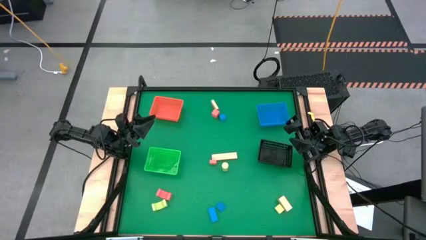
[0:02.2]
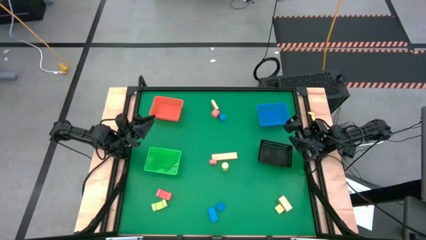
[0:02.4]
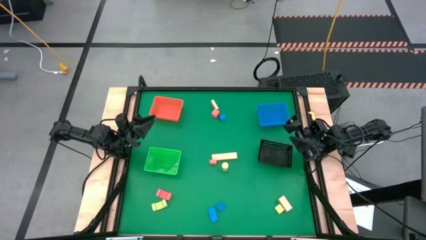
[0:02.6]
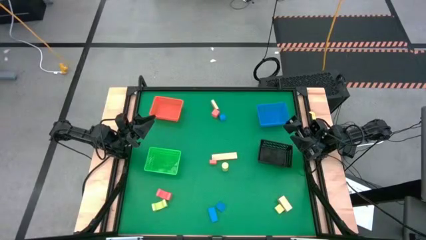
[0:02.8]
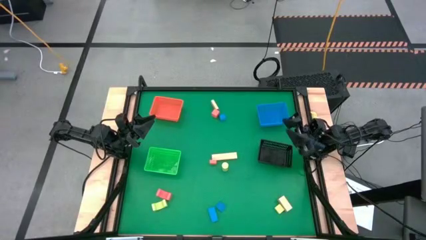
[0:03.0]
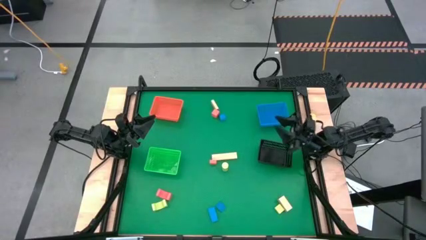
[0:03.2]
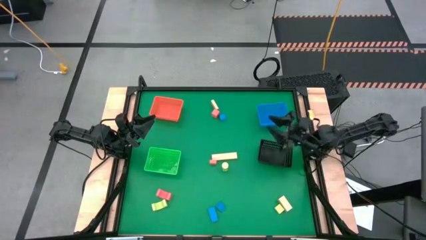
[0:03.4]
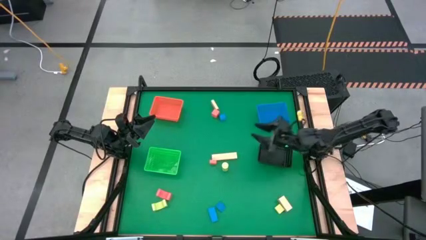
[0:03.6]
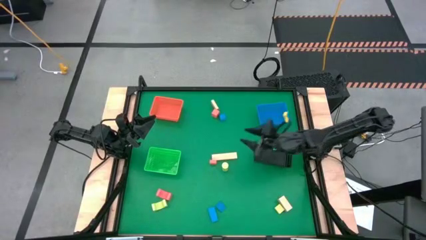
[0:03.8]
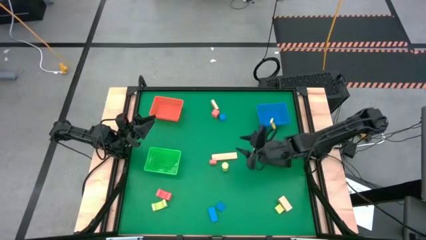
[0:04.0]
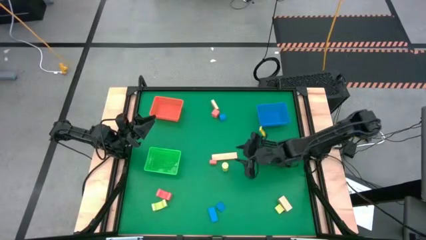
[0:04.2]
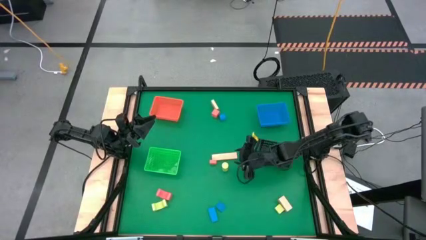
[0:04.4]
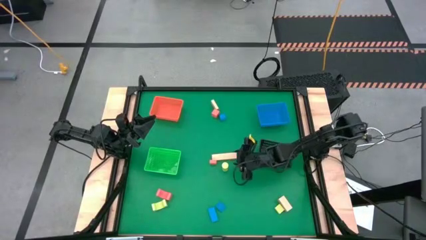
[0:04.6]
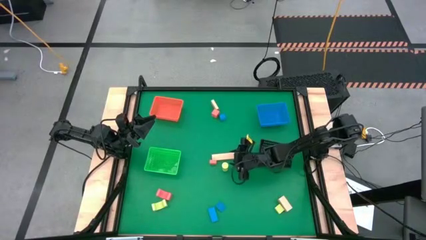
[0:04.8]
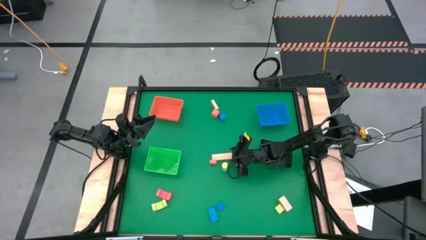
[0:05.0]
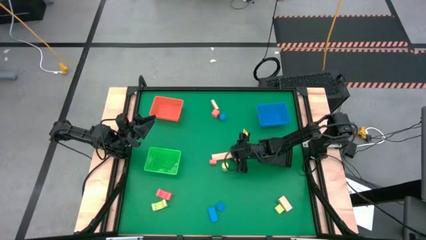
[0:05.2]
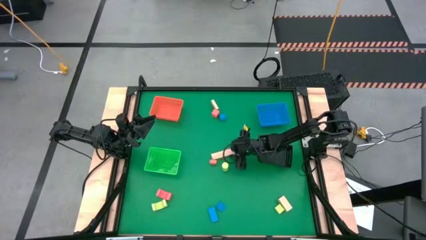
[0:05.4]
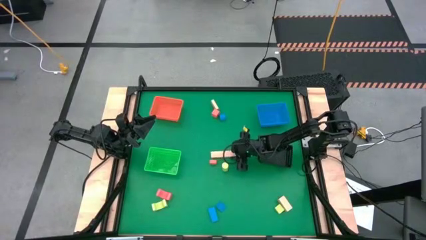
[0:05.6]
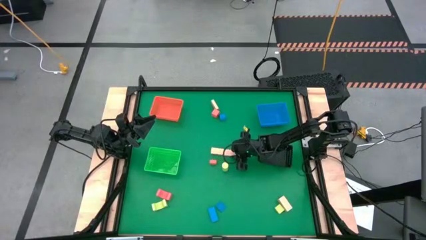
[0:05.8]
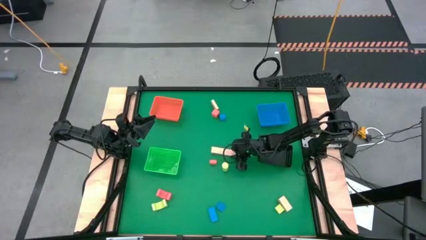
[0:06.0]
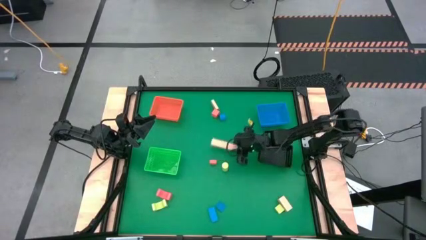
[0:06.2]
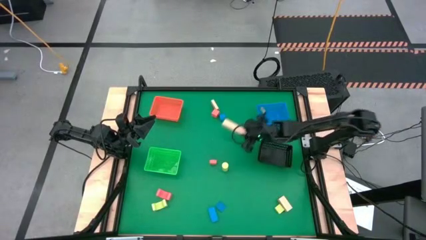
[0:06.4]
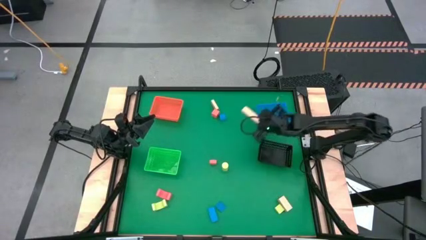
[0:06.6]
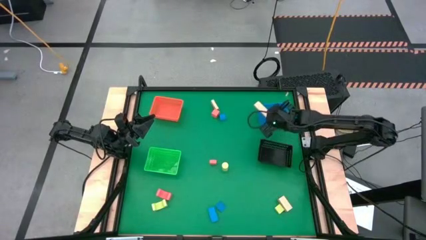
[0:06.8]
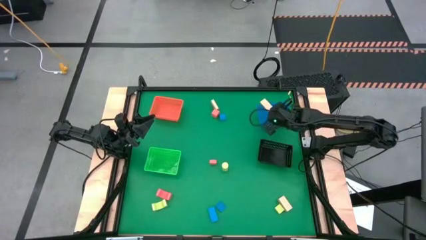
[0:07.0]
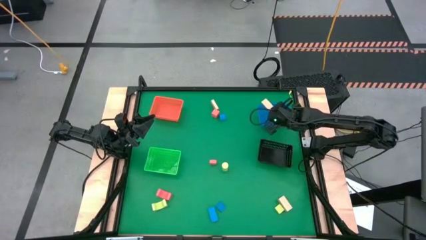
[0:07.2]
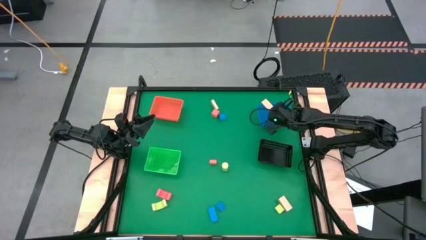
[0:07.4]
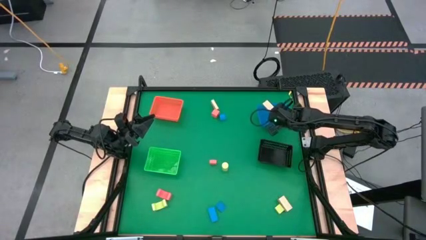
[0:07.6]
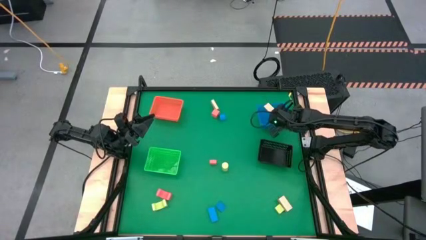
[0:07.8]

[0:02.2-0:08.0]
Task: Sort & place blocks by color
Put the middle light brown block into the blue basket

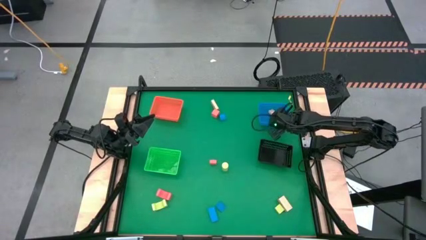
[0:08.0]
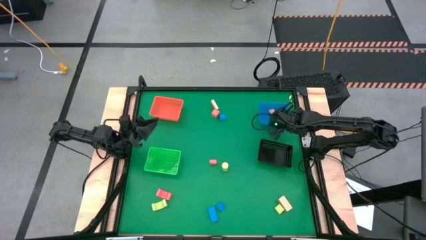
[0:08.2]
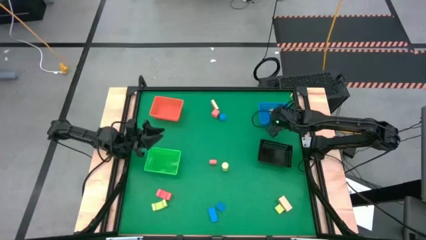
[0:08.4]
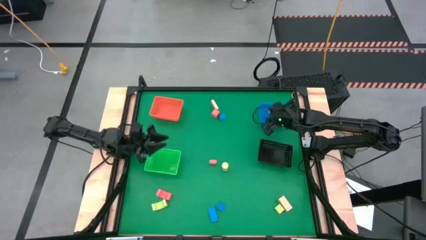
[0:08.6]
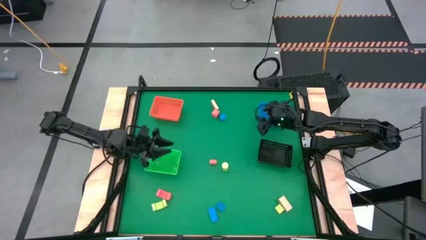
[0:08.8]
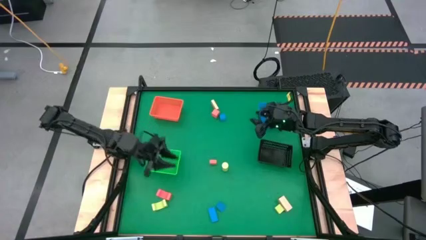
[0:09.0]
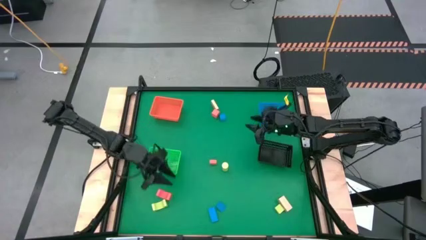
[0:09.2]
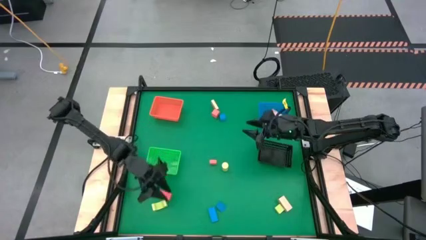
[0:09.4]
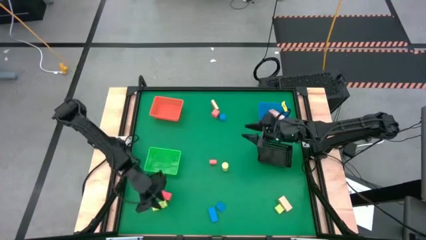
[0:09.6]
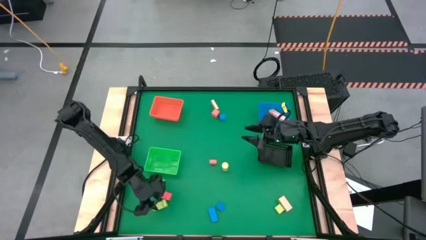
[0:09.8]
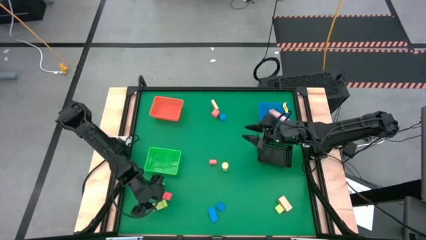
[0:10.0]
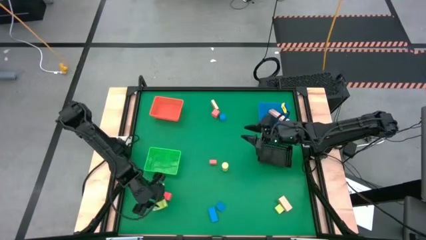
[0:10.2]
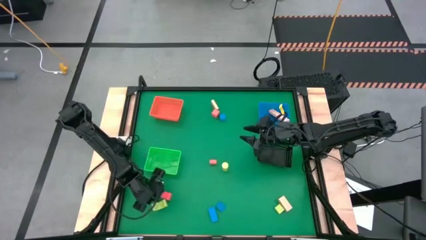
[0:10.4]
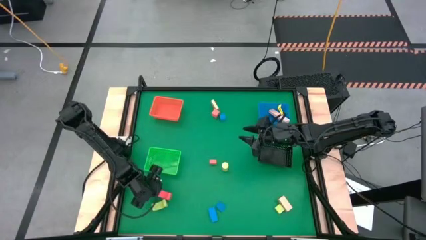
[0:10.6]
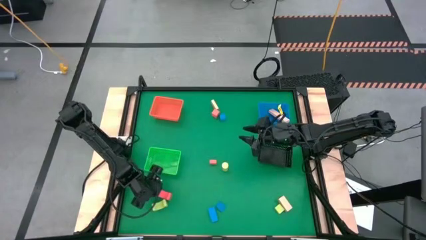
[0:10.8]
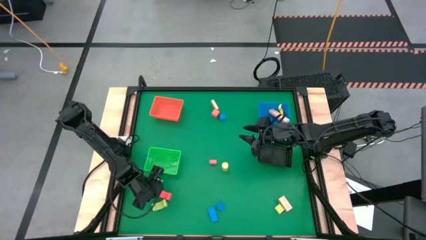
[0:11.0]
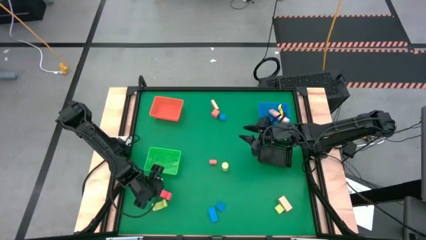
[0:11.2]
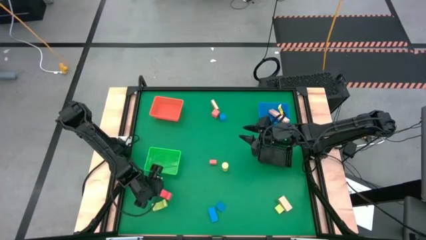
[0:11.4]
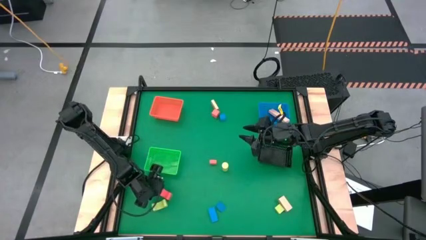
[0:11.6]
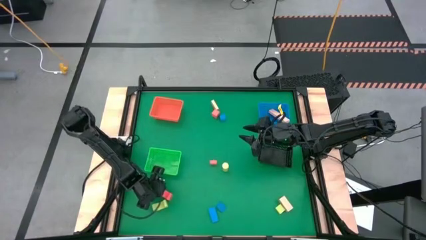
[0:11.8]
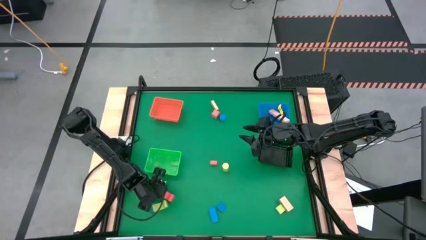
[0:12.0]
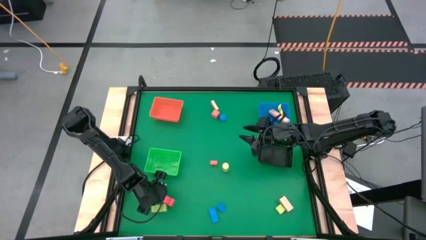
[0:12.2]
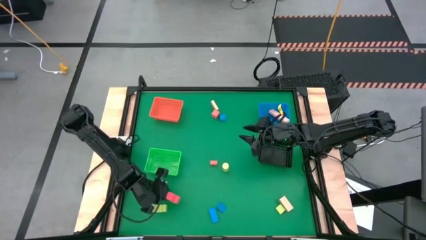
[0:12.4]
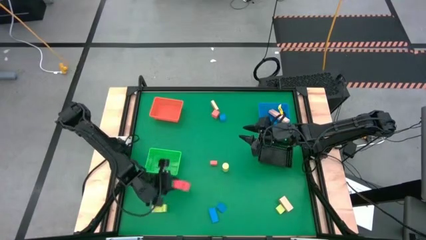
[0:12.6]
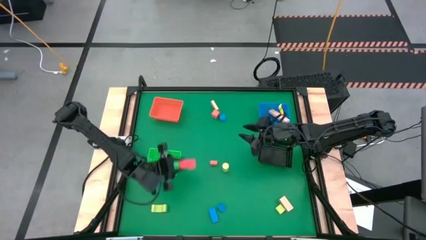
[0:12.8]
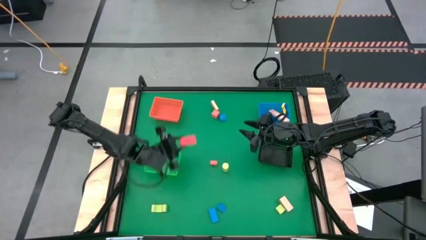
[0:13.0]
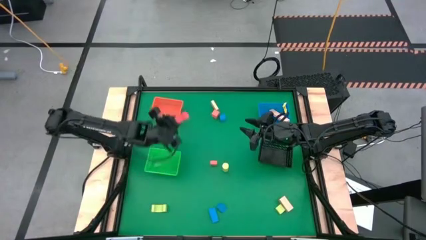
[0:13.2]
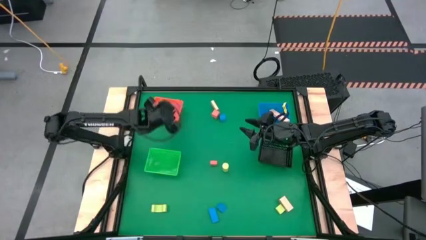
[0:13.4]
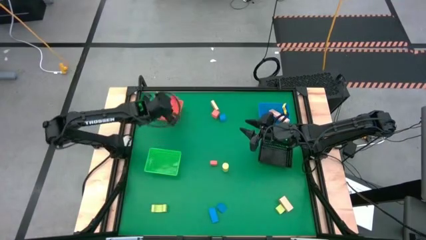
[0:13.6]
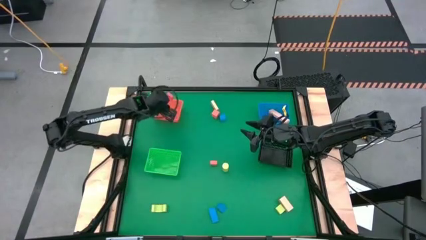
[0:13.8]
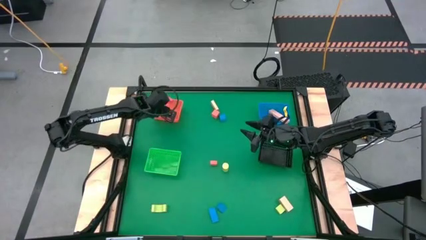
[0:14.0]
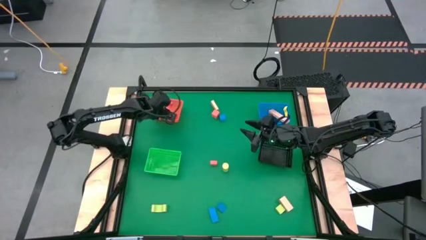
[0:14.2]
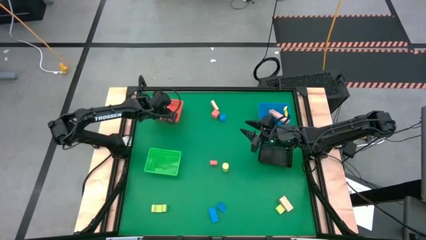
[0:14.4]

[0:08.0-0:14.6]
Put the bottom red block into the orange basket

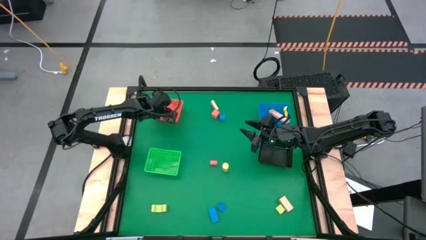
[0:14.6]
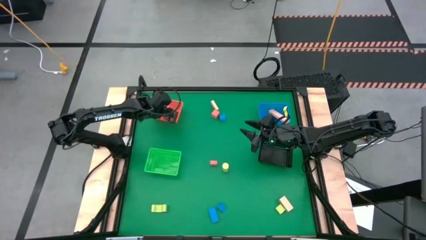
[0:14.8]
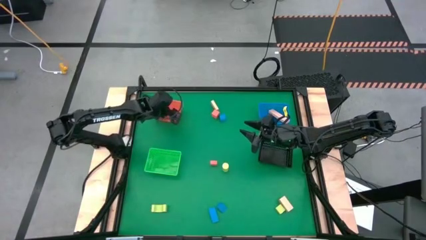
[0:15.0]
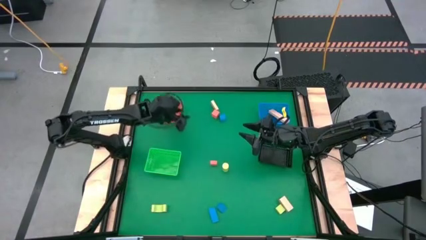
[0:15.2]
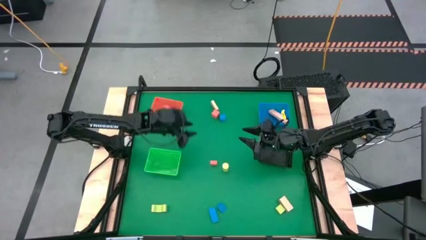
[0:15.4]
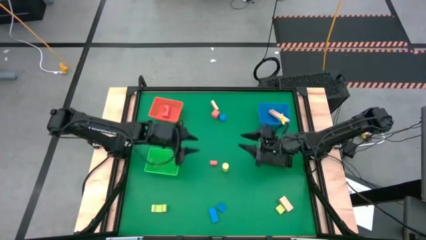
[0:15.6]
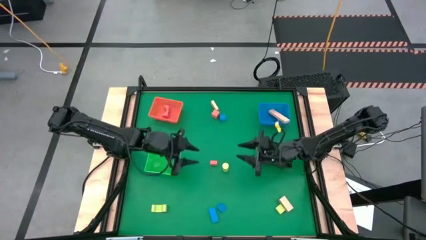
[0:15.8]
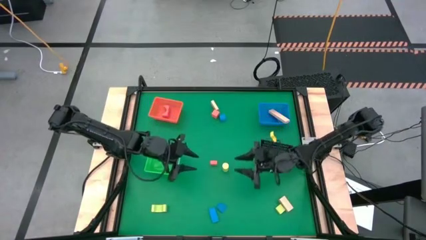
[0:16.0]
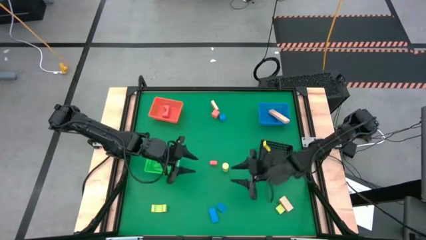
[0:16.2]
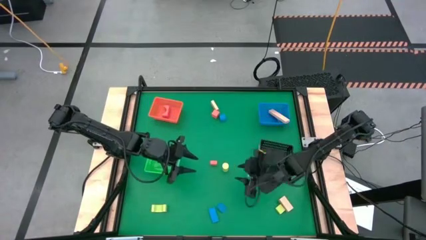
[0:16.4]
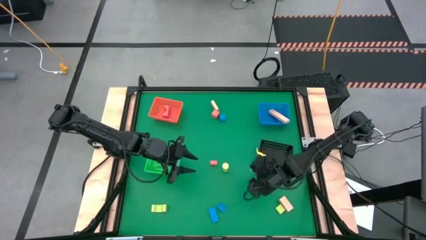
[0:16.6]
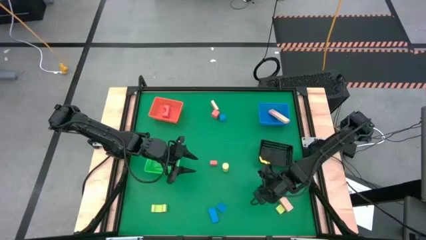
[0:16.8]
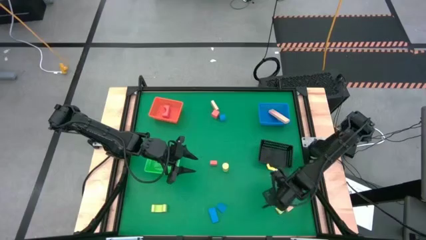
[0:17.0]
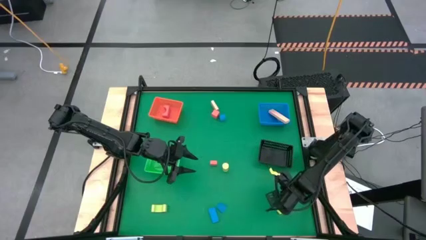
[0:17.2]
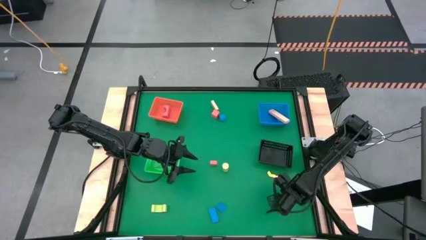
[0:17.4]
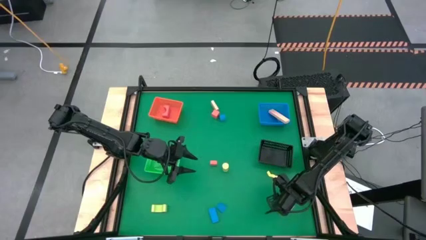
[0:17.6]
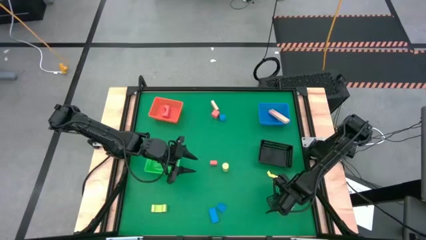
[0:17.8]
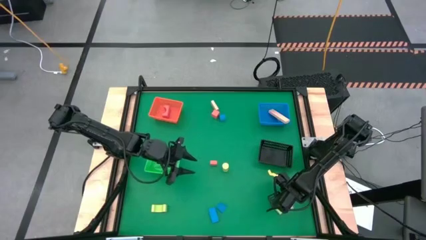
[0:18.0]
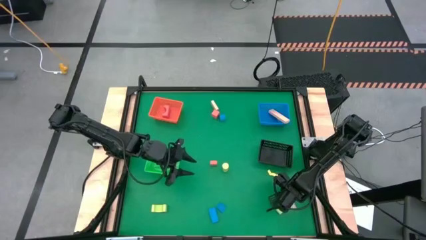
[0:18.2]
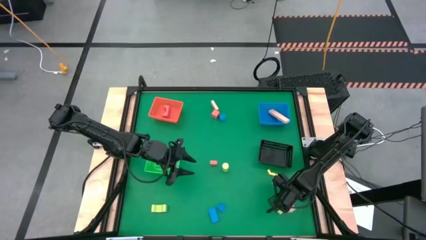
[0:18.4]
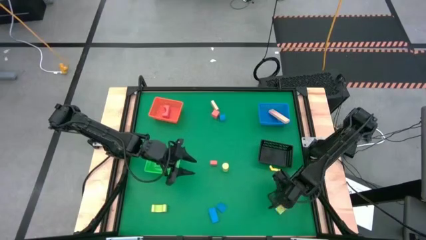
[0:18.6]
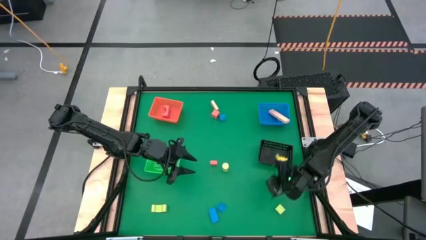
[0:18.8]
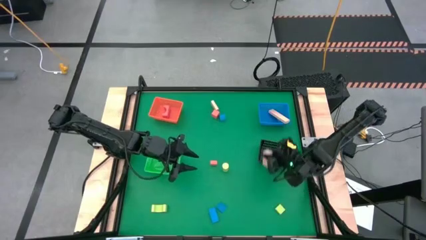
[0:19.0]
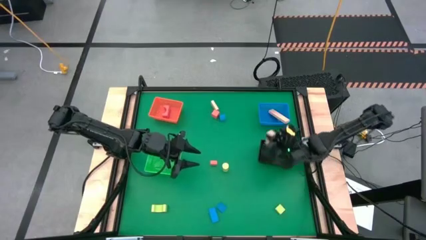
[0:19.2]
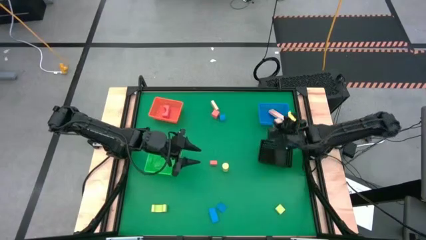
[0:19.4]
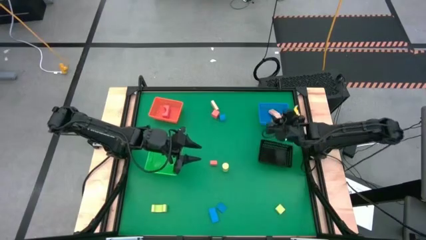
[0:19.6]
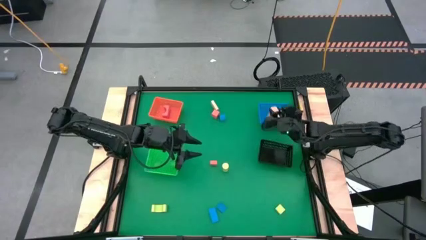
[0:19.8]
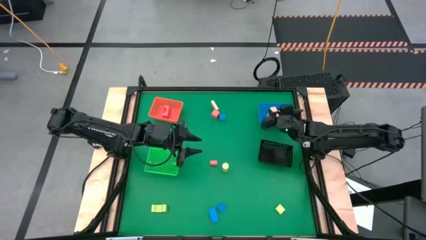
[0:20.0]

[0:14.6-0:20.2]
Put the bottom light brown block into the blue basket
